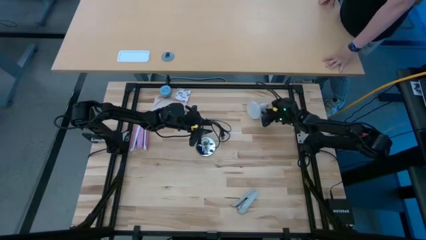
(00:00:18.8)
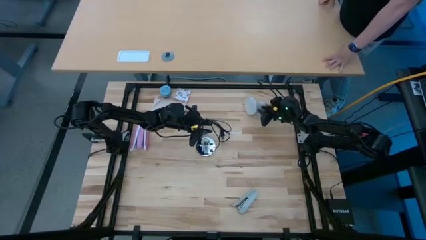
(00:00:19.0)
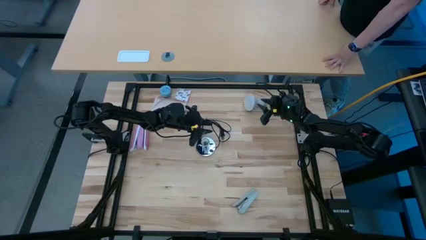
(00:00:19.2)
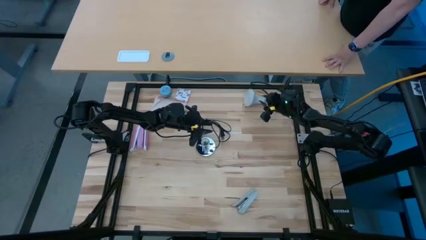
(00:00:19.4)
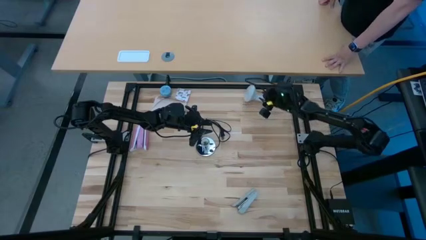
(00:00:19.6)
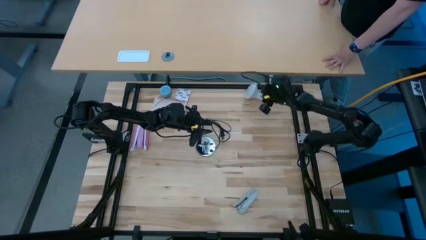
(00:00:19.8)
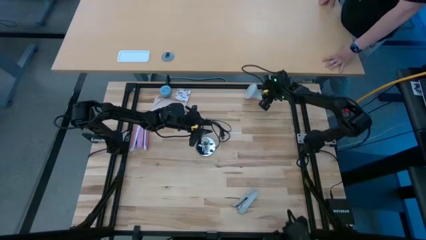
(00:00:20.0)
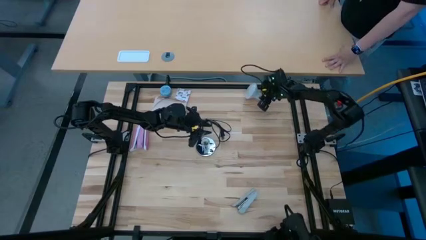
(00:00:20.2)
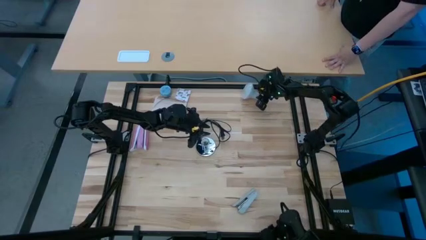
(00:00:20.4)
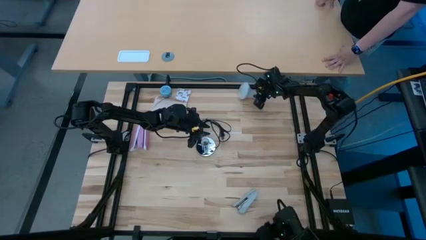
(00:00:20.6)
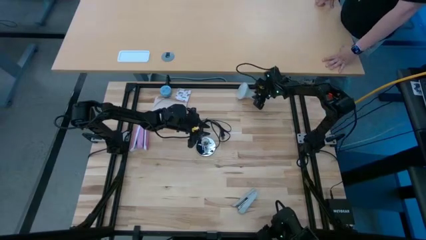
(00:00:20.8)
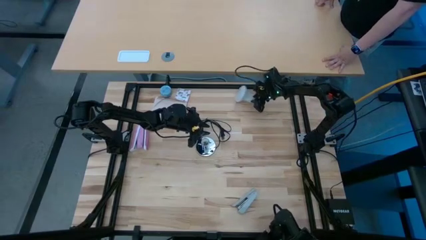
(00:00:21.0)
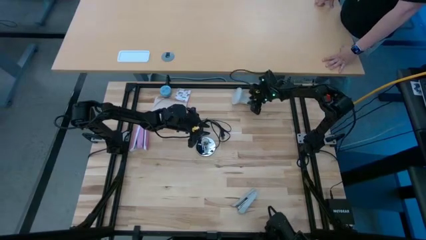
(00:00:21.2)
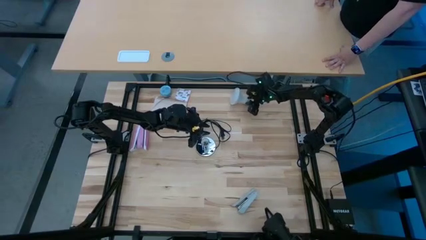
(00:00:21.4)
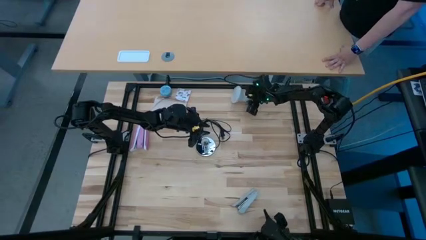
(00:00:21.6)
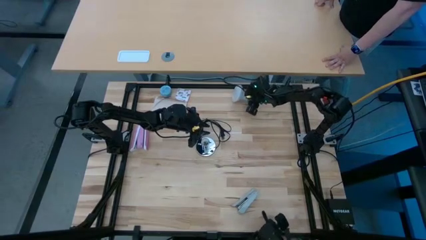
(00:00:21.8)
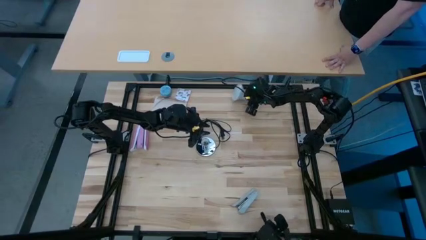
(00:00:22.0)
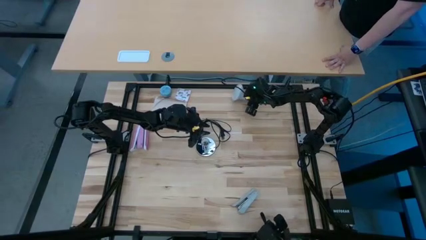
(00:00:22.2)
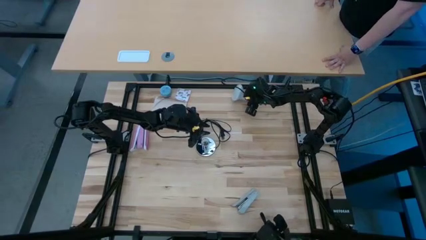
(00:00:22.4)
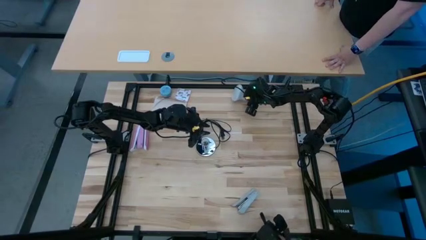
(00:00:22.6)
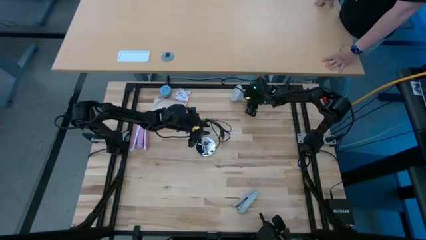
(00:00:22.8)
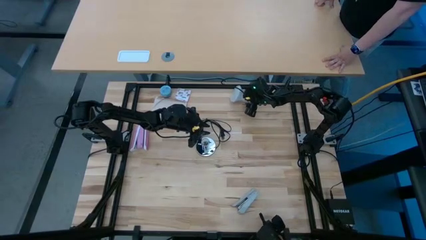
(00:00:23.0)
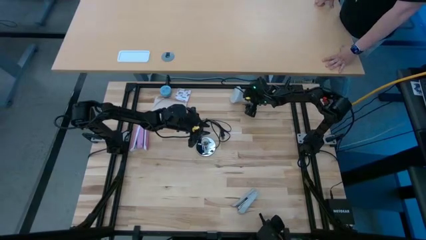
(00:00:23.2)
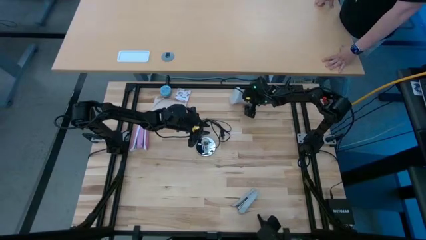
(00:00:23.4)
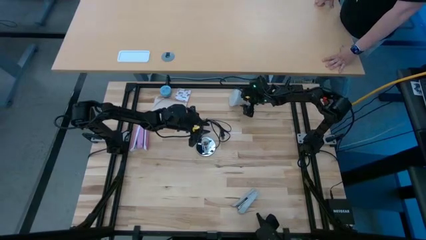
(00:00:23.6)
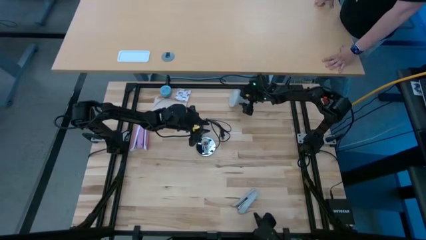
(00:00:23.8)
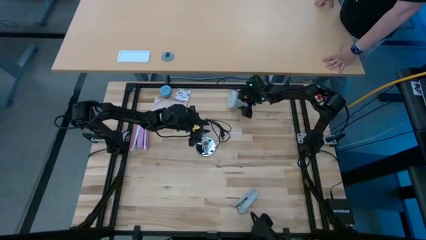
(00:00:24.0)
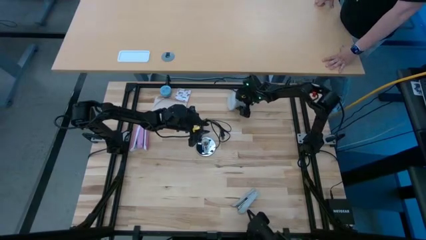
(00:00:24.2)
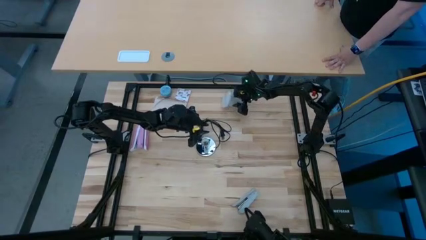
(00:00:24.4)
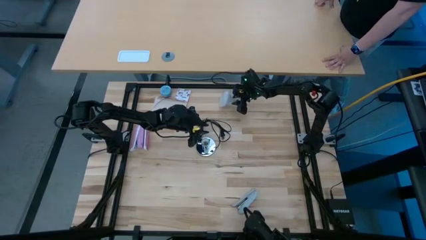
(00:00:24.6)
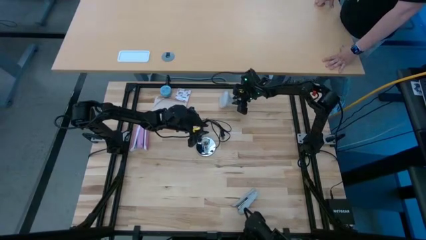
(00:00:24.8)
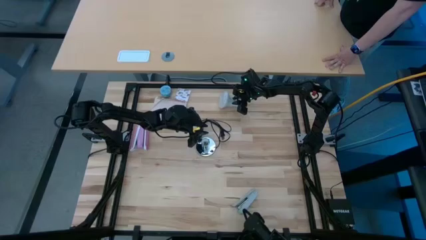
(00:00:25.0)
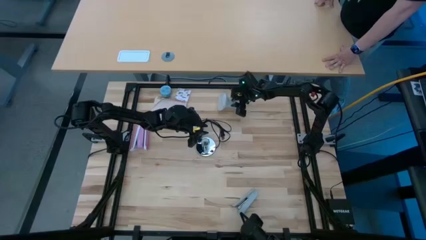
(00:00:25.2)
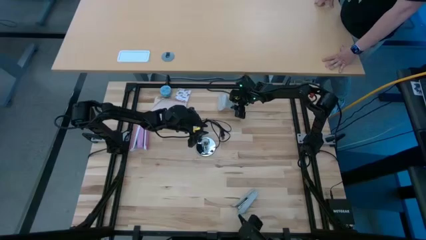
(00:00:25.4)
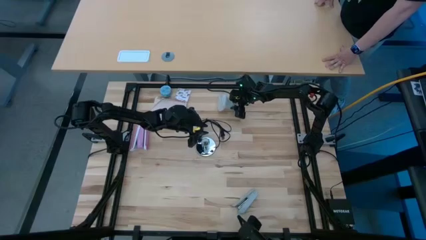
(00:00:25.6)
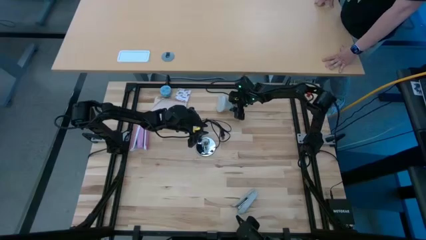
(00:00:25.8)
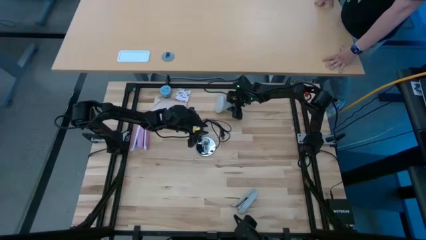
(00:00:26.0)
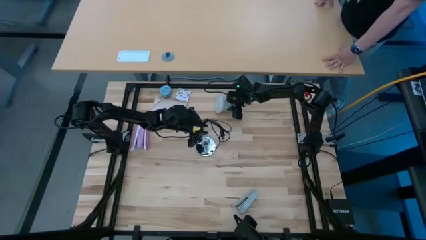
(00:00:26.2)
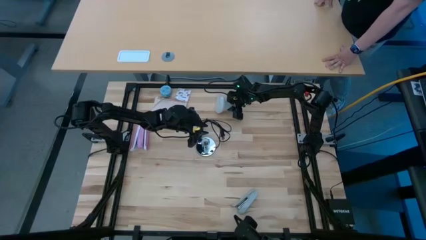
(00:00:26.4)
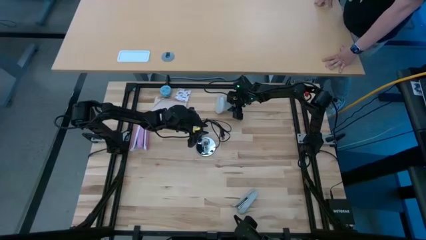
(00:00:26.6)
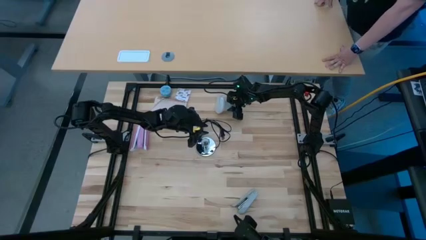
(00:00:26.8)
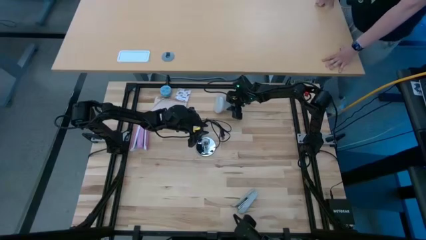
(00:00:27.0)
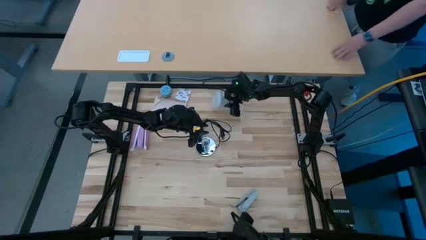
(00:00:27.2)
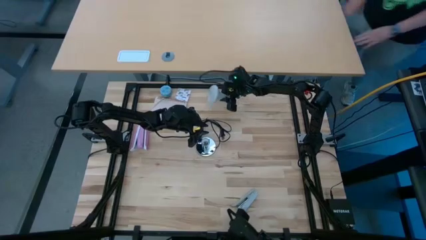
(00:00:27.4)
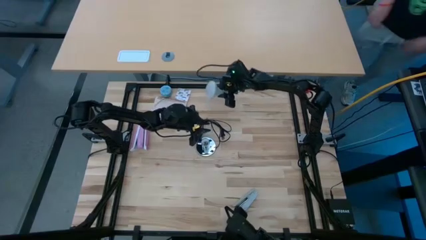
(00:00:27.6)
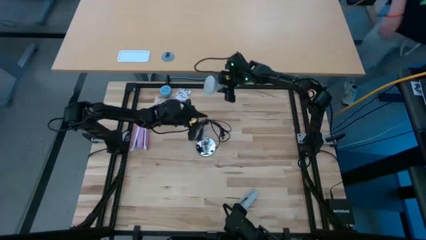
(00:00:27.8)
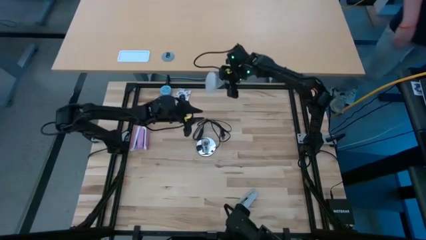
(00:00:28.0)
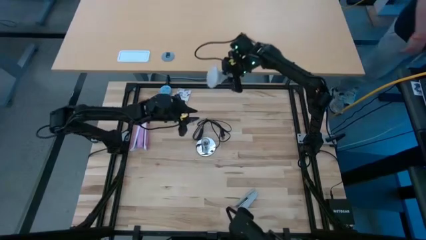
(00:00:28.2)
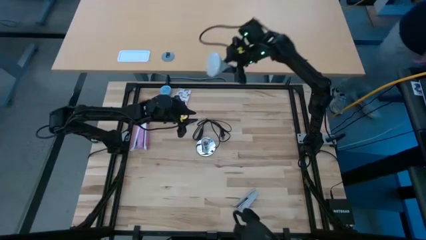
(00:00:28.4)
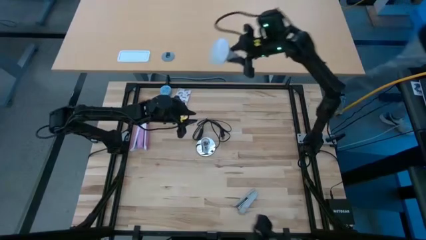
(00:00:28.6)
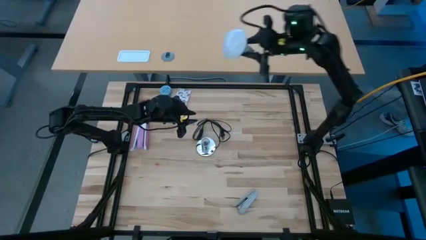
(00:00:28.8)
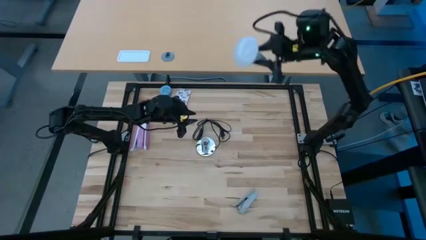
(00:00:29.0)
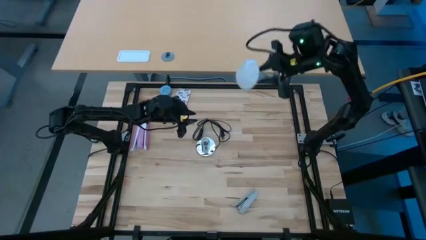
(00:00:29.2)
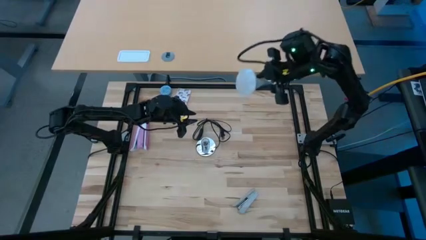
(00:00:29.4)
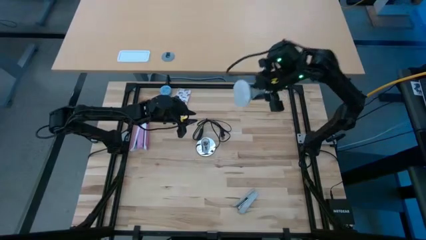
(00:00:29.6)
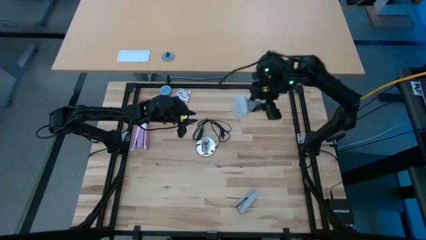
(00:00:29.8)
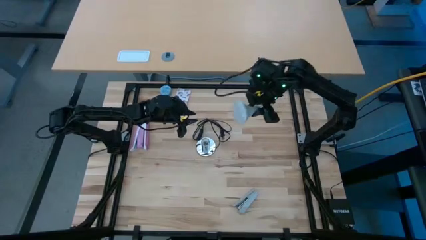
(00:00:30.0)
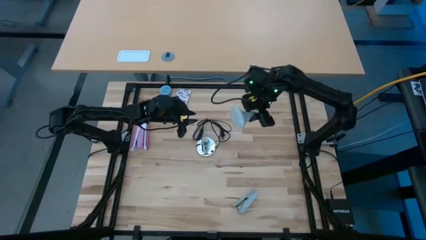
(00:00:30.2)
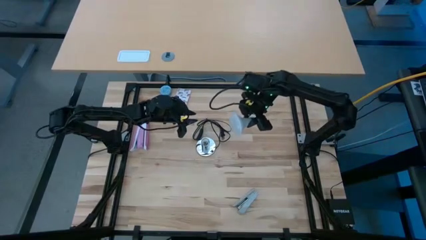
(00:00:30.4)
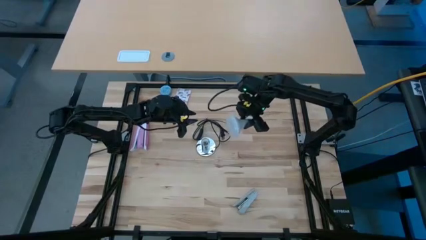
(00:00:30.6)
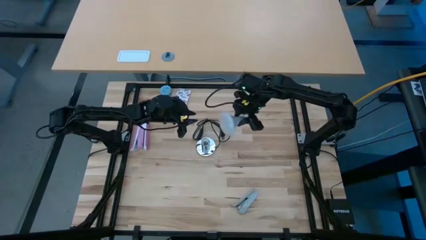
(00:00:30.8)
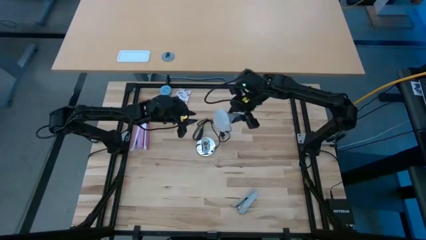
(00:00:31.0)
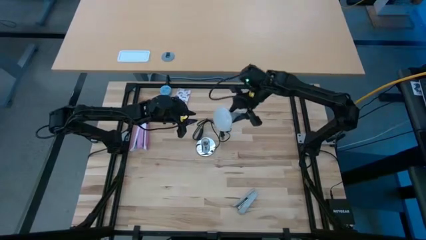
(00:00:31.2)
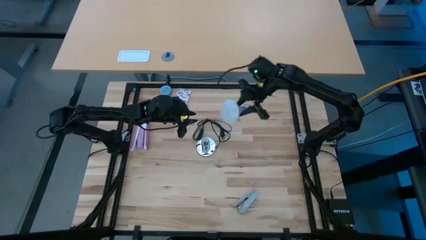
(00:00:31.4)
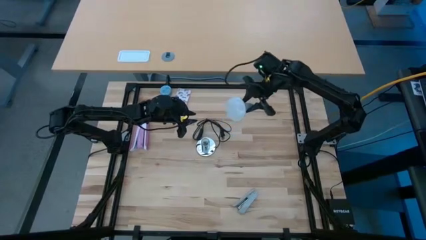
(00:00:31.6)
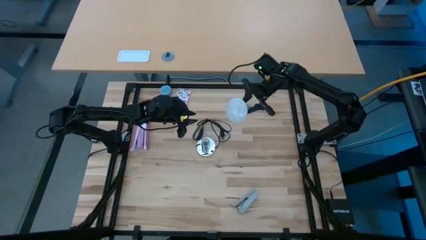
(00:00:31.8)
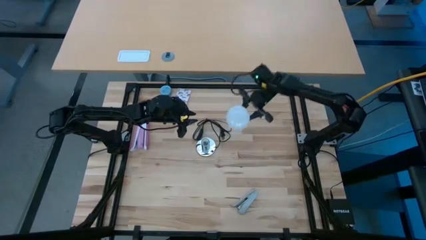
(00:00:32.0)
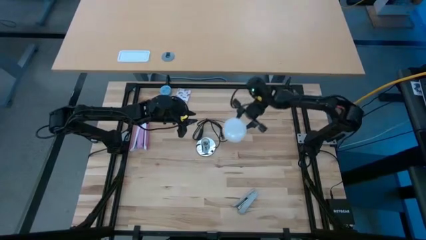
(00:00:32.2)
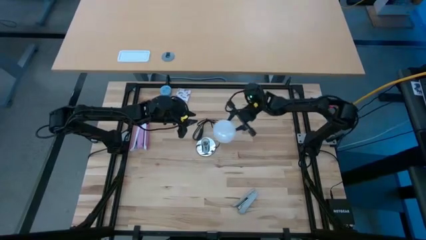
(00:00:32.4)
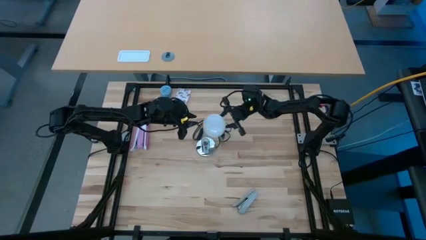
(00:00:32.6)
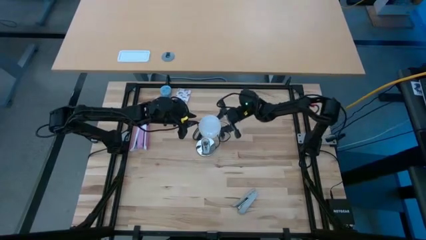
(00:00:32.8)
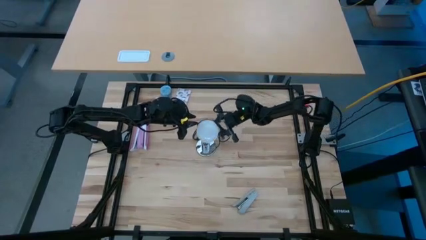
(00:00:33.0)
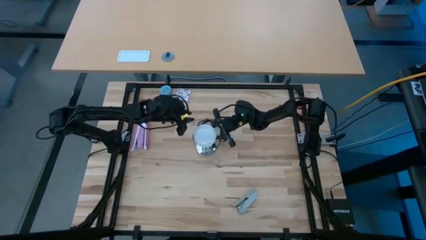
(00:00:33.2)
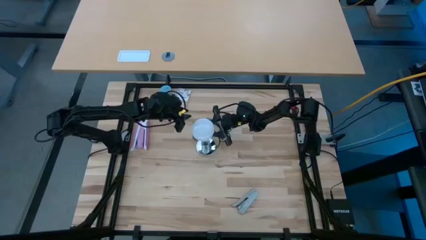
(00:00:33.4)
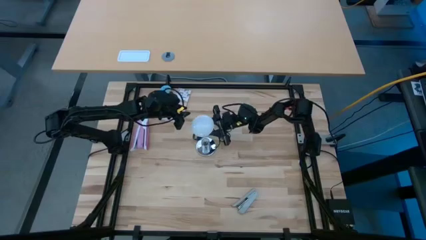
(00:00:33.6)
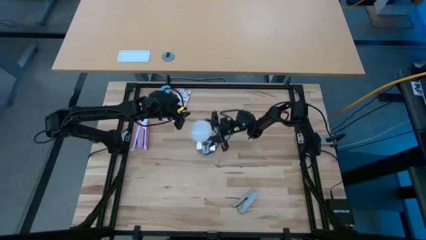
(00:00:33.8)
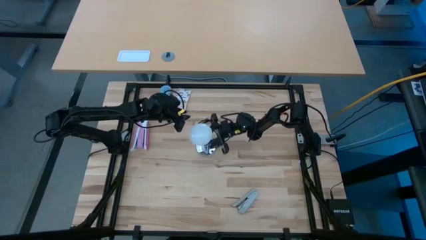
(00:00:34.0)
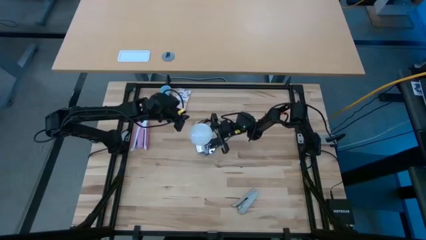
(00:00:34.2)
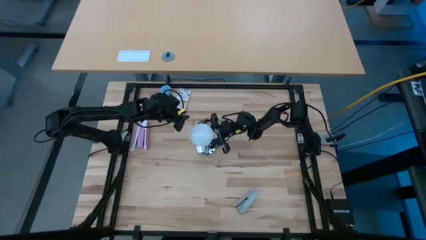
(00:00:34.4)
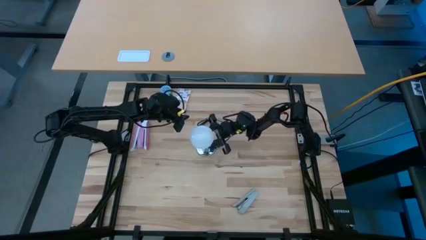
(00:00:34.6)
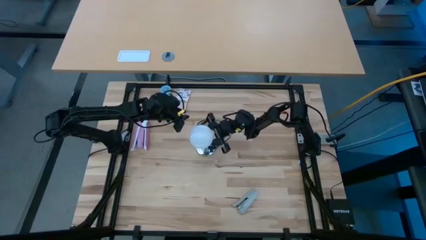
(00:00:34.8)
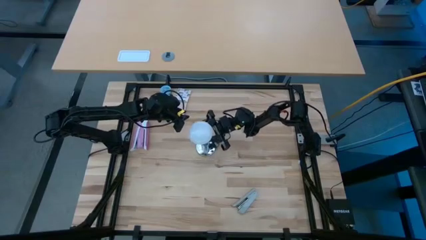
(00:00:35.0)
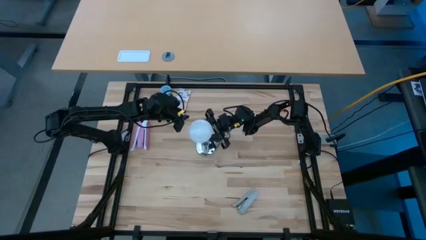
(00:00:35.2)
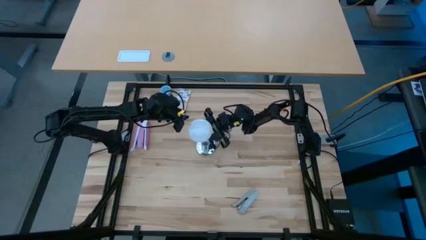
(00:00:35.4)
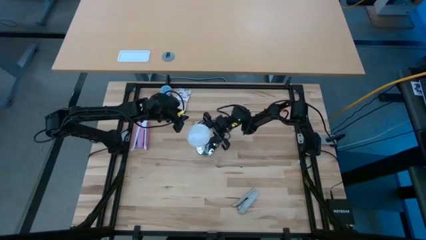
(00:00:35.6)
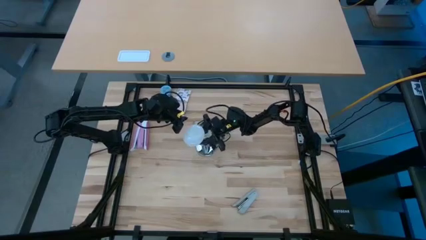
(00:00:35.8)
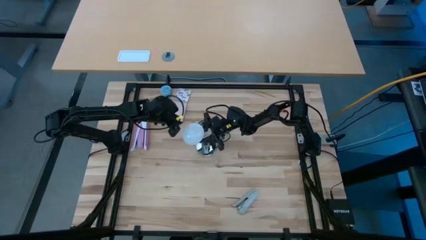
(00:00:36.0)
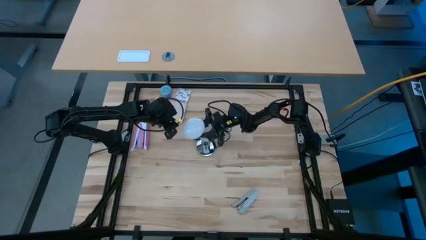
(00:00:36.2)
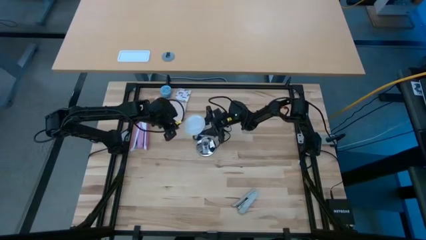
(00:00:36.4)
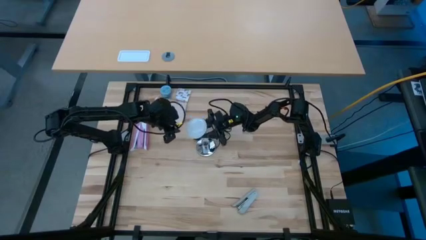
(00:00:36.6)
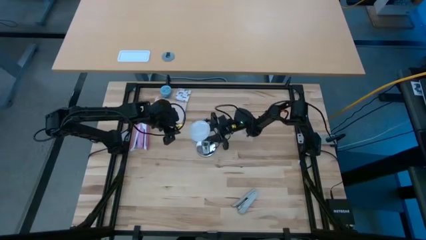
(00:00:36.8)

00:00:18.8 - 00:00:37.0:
Task: Screw lightbulb
Insert the light bulb into the lamp
